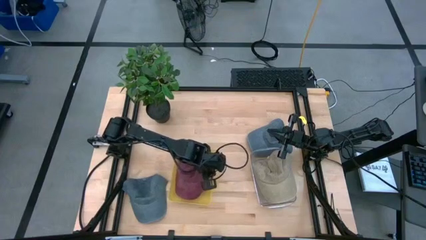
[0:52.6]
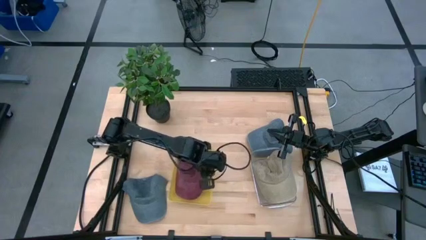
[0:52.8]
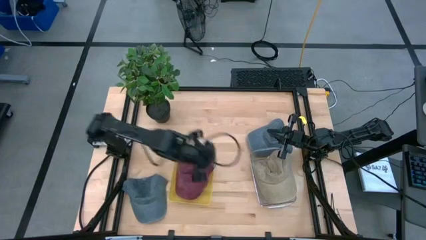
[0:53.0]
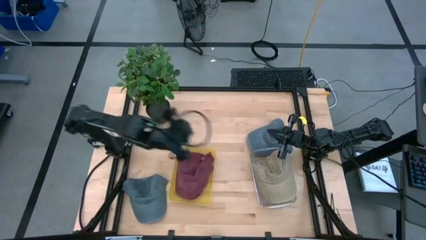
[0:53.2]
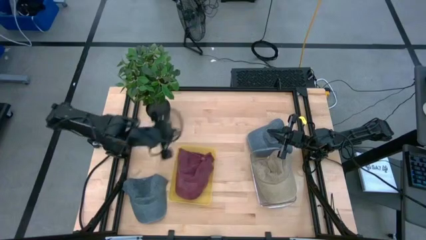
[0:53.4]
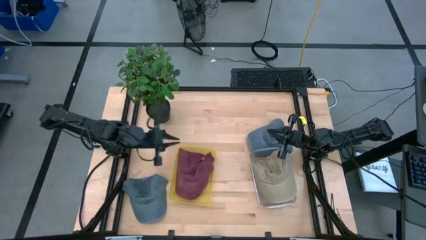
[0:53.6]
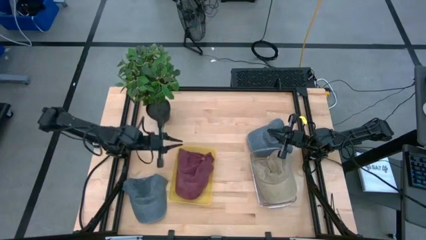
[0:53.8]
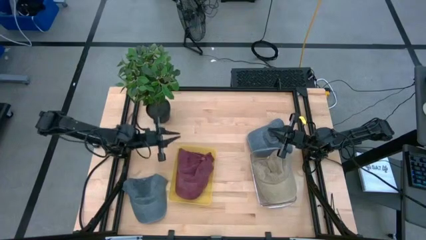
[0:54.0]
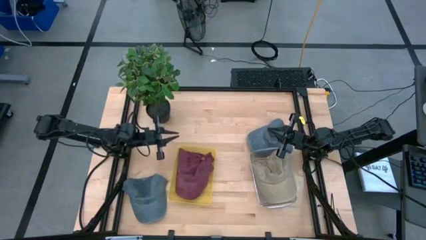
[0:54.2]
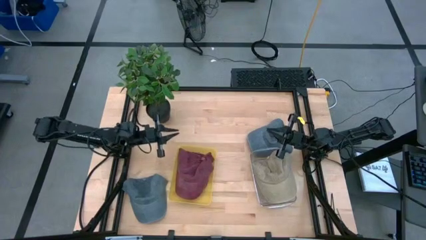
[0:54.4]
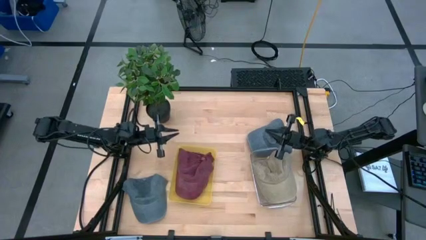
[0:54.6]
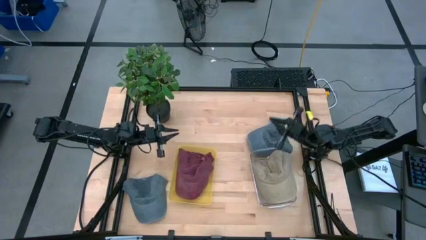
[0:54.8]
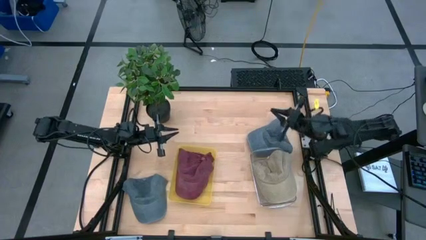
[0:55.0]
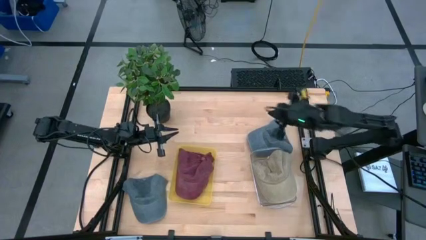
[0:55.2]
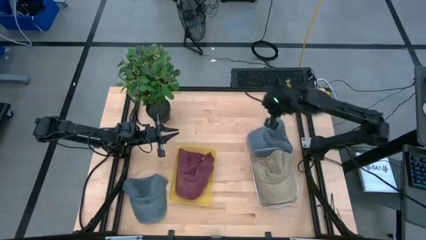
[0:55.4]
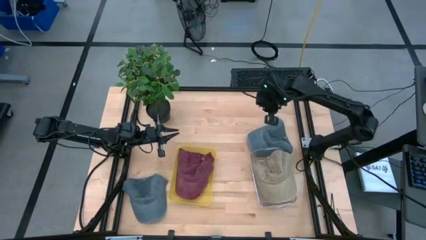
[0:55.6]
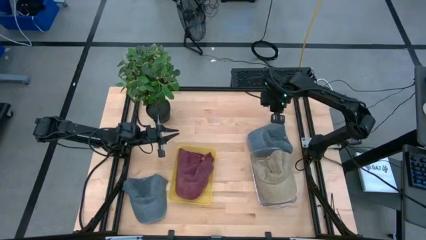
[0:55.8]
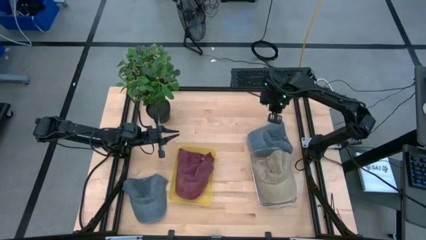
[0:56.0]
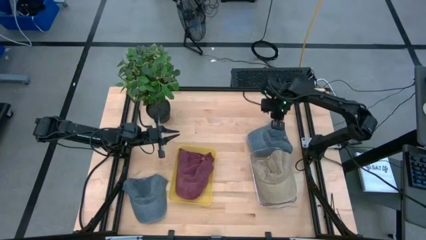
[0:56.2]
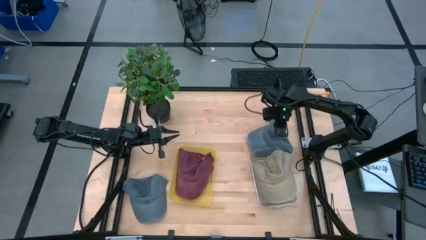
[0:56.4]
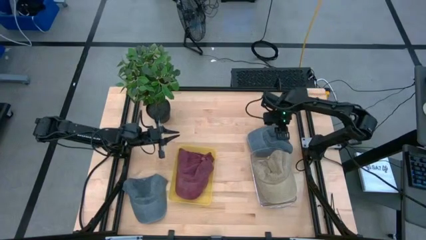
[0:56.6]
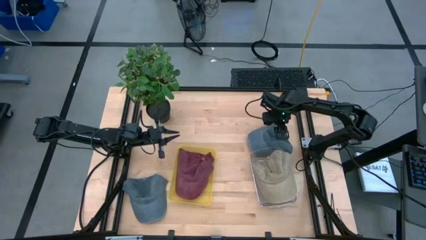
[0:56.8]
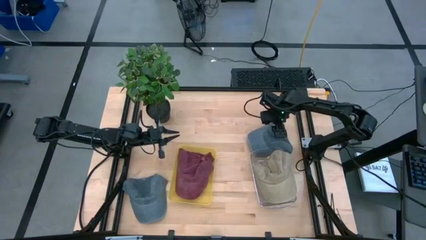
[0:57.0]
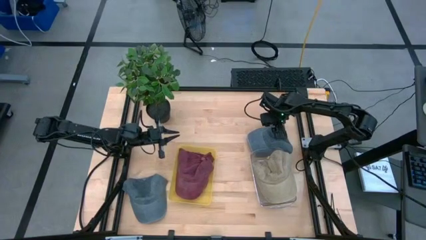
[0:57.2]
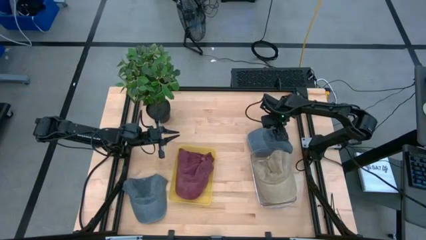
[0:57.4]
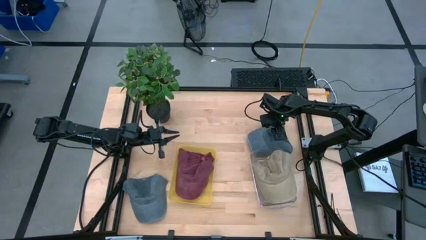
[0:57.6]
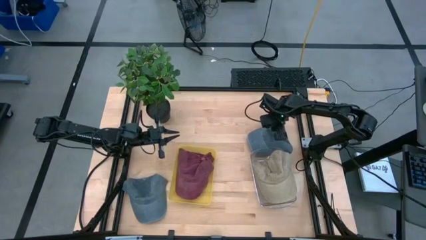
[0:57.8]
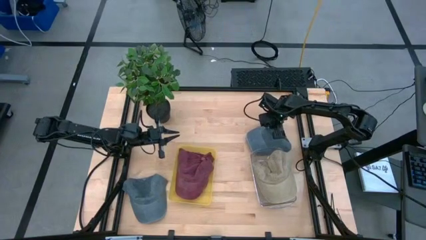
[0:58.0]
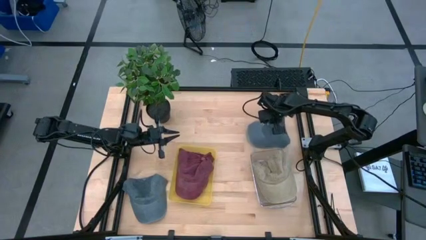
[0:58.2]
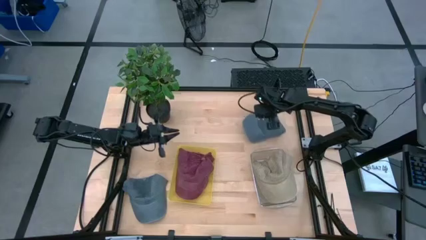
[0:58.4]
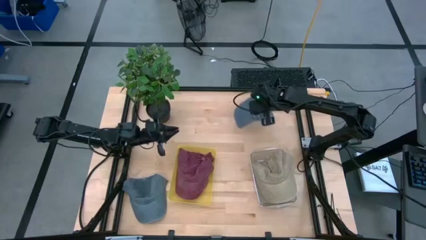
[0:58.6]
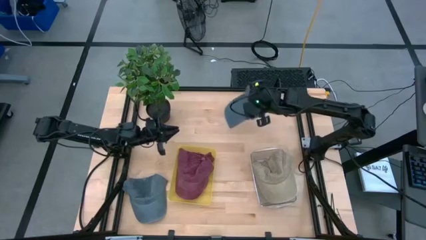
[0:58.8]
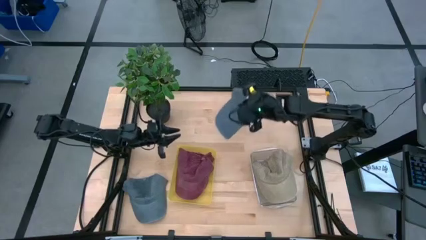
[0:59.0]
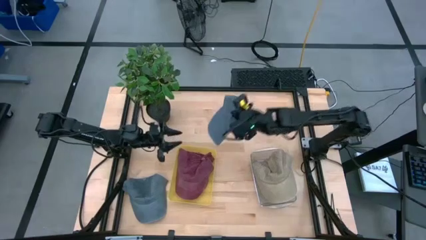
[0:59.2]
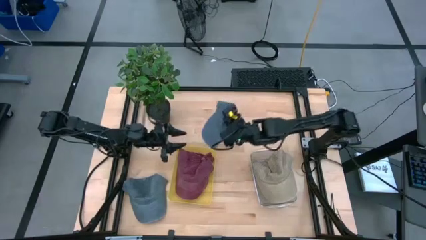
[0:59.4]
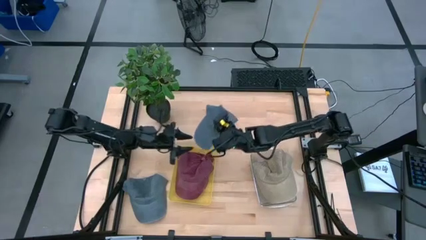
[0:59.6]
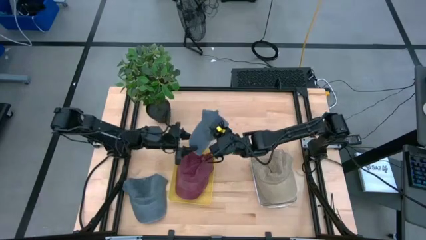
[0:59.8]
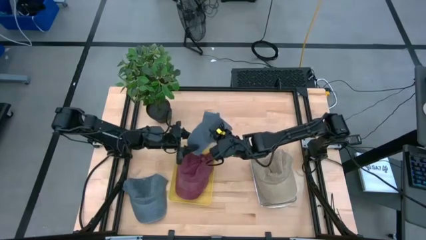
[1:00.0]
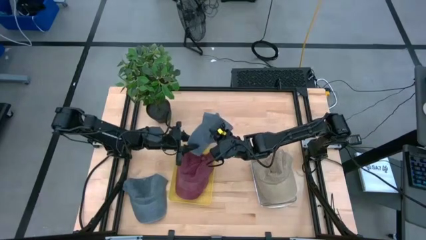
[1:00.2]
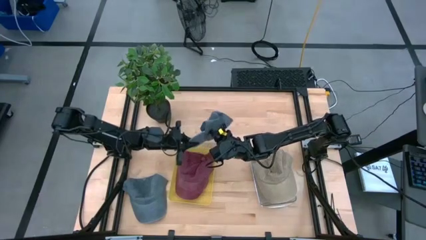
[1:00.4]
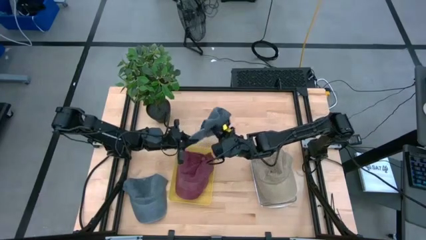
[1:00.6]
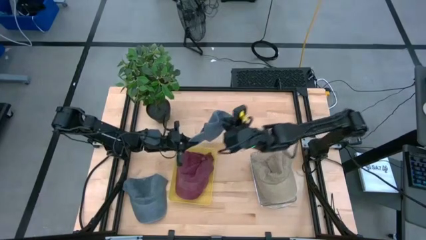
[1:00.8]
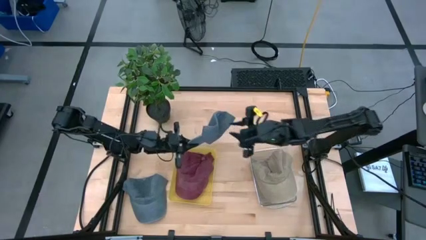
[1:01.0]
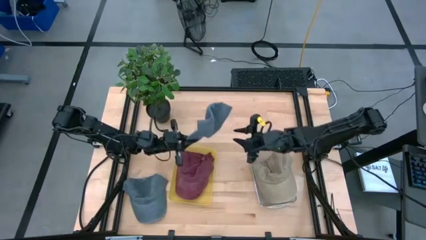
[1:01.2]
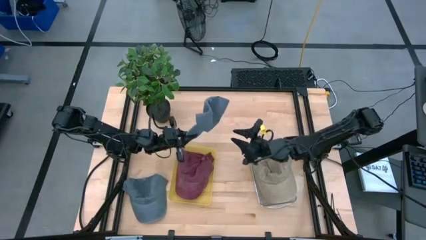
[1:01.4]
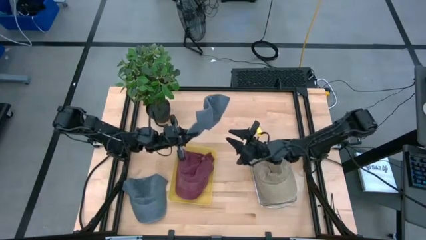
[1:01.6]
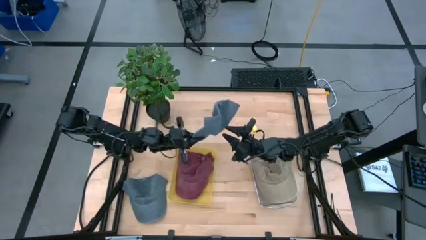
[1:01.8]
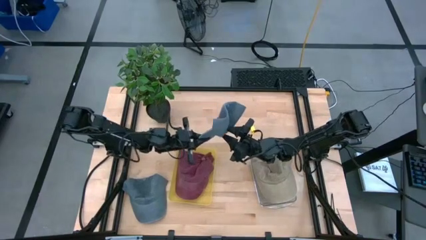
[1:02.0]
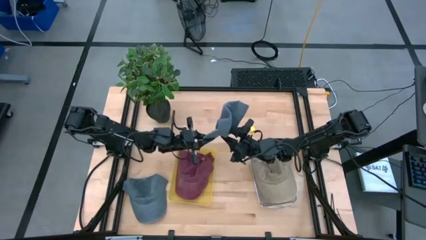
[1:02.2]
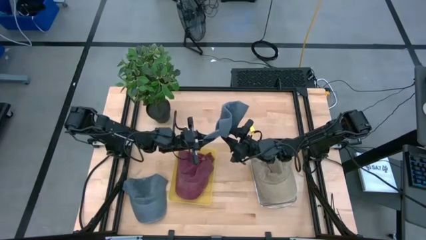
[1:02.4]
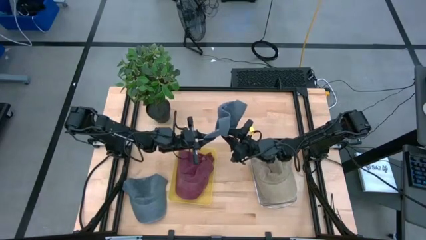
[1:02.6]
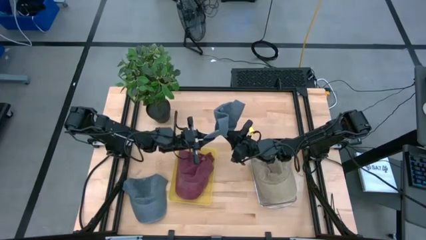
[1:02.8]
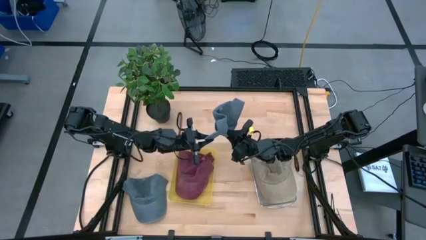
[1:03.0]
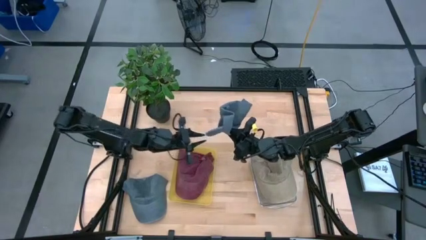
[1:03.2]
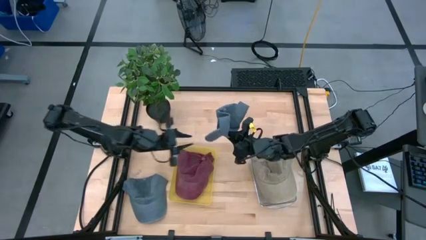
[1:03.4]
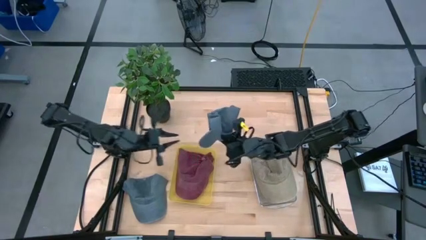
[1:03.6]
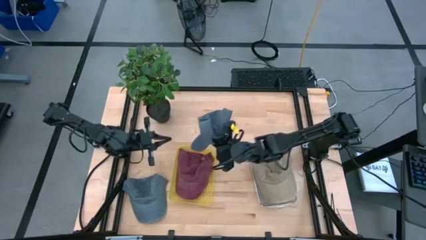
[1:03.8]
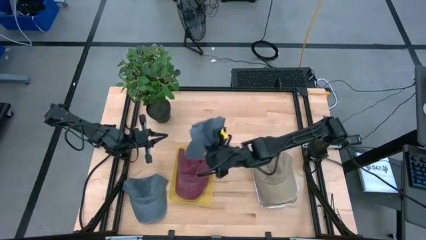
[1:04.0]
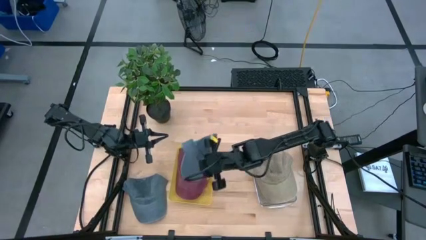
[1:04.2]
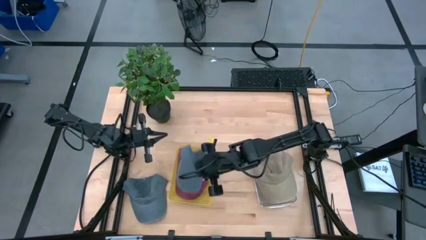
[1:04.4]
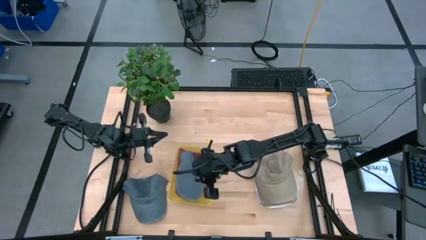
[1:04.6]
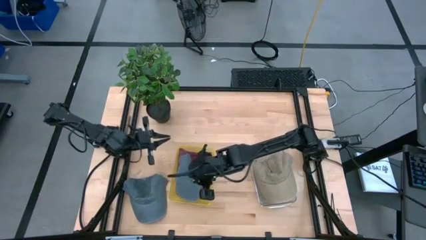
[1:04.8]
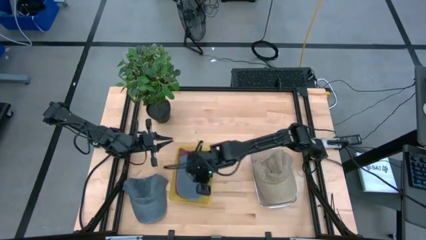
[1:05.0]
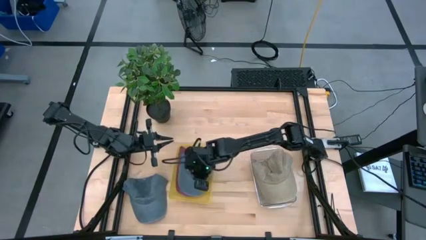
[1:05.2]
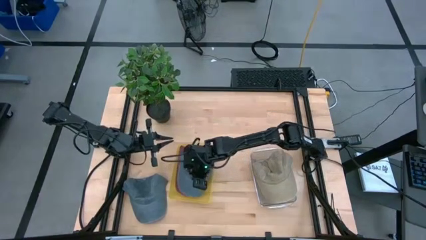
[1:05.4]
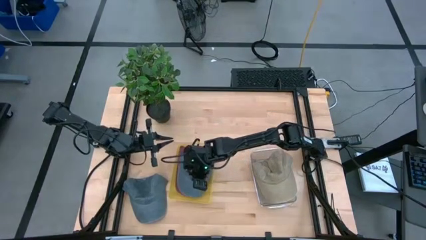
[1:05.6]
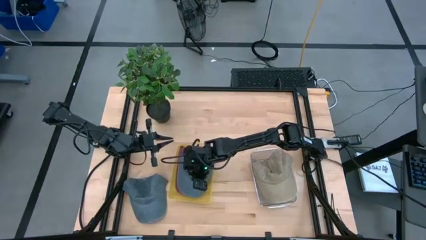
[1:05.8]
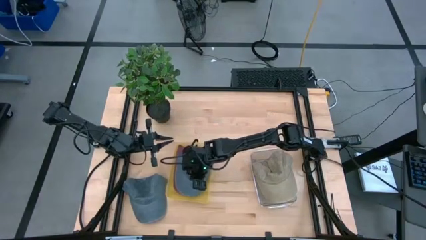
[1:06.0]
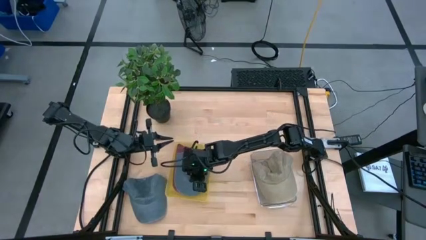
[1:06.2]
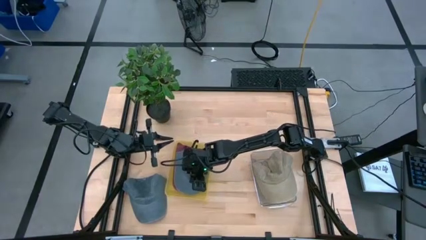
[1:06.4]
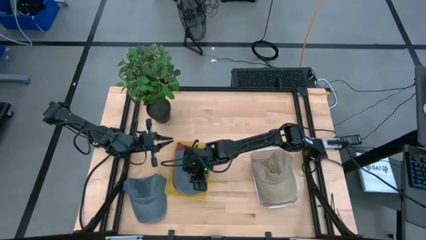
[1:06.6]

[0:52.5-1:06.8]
Task: Pick & Place hat
Put the top blue cap into the yellow bin
